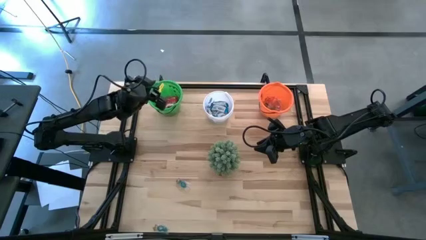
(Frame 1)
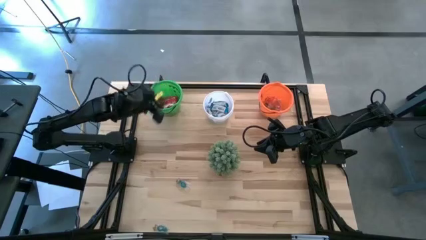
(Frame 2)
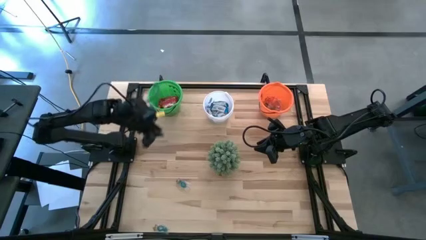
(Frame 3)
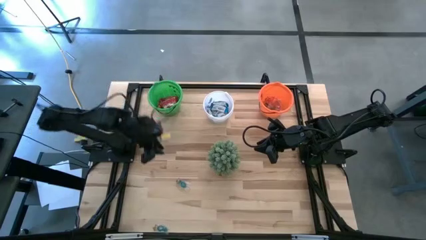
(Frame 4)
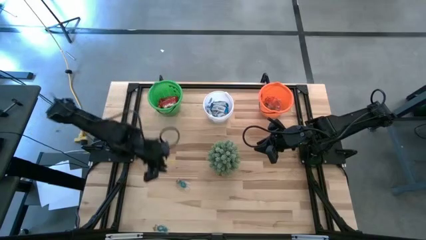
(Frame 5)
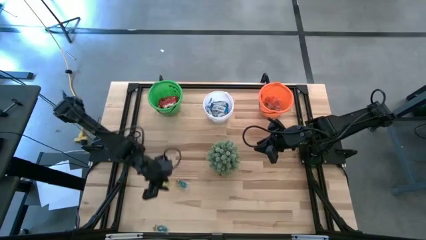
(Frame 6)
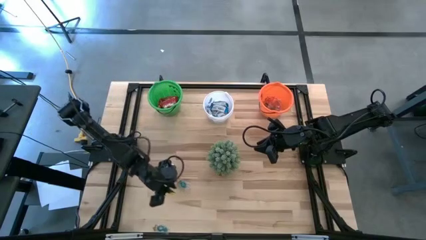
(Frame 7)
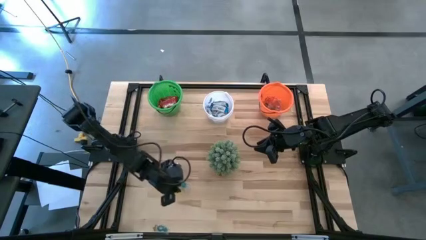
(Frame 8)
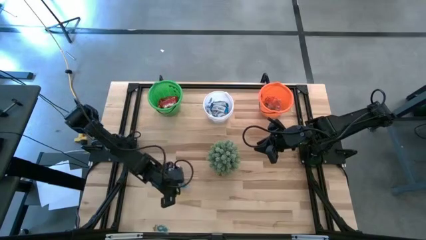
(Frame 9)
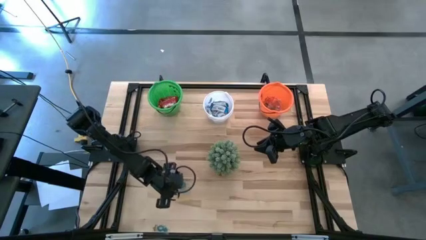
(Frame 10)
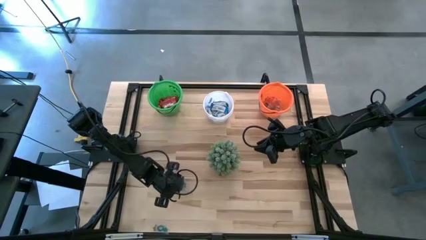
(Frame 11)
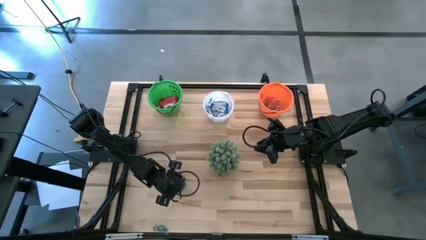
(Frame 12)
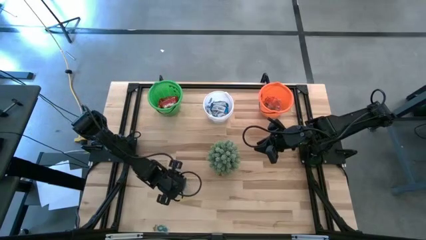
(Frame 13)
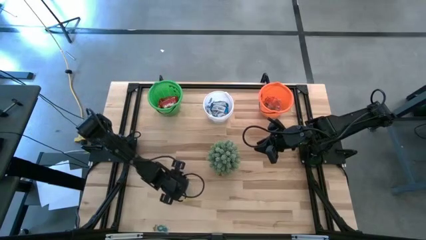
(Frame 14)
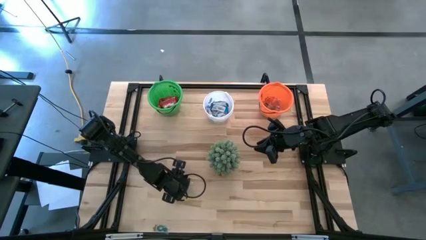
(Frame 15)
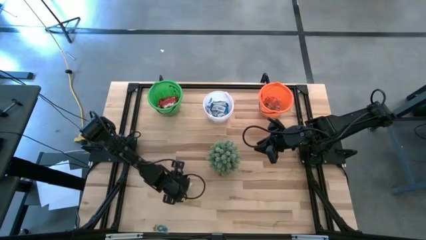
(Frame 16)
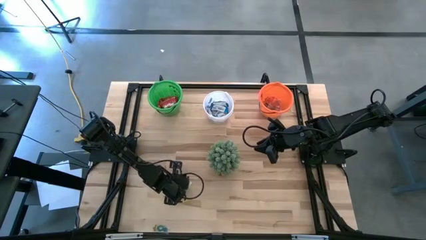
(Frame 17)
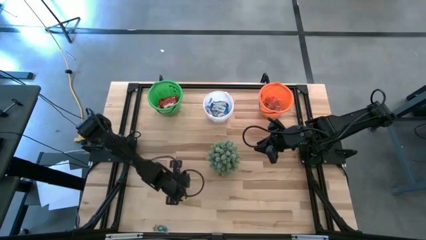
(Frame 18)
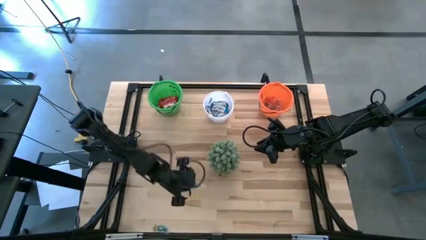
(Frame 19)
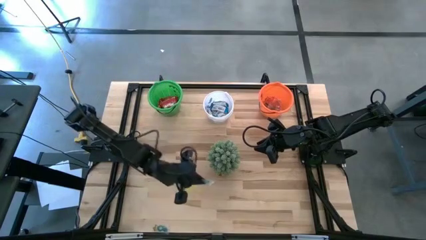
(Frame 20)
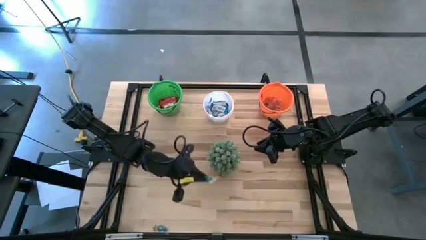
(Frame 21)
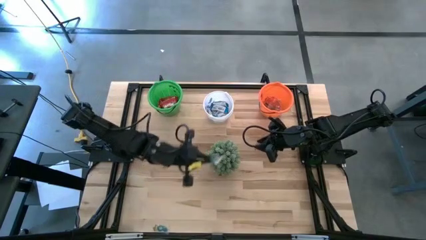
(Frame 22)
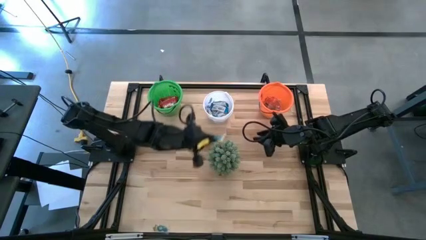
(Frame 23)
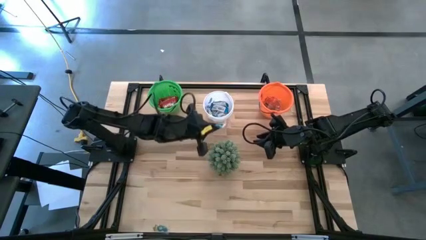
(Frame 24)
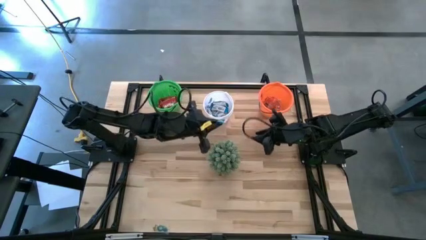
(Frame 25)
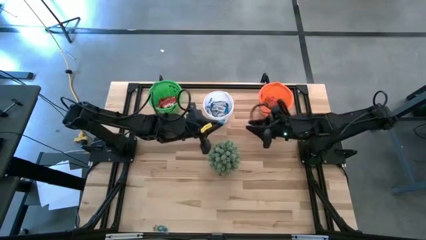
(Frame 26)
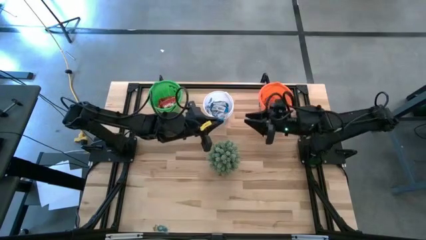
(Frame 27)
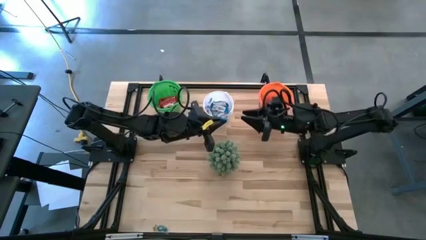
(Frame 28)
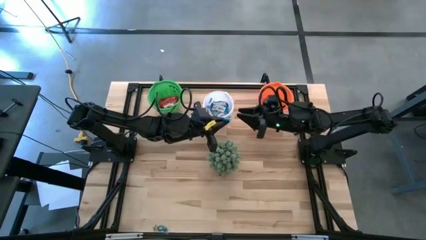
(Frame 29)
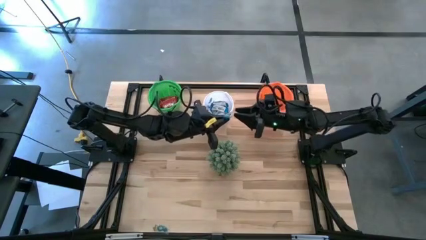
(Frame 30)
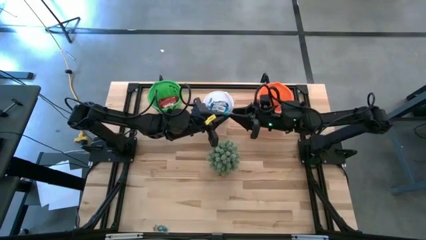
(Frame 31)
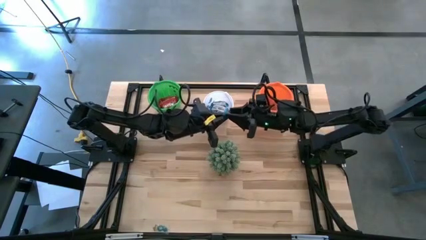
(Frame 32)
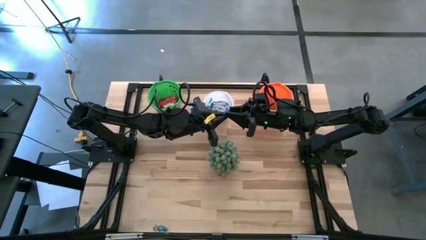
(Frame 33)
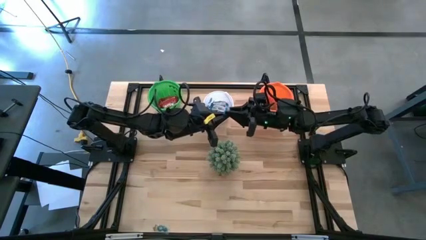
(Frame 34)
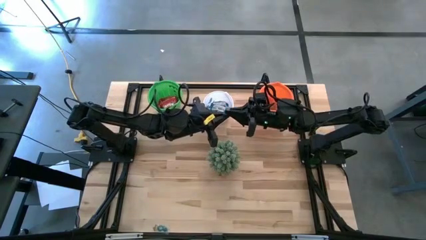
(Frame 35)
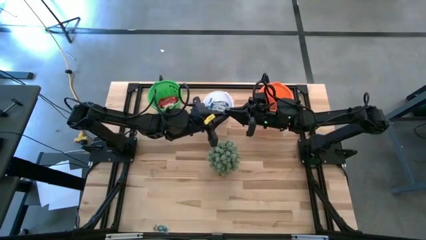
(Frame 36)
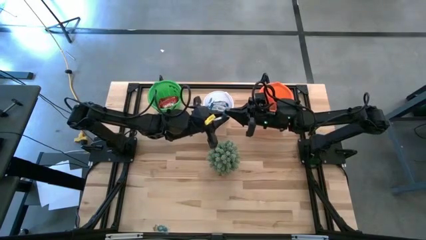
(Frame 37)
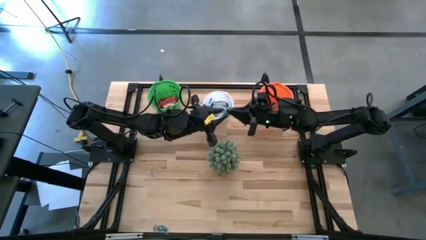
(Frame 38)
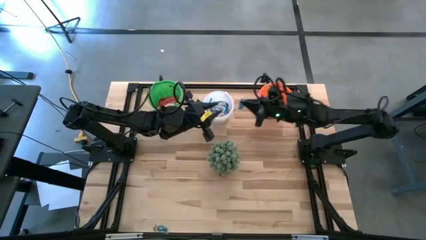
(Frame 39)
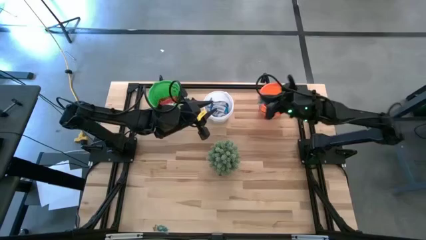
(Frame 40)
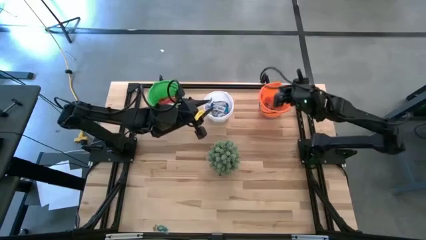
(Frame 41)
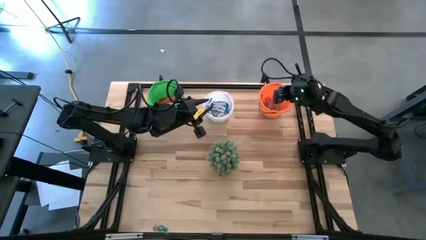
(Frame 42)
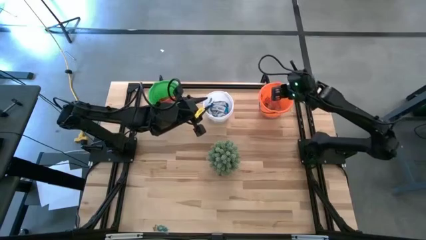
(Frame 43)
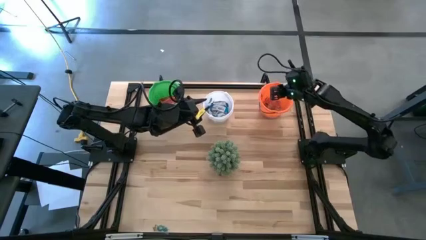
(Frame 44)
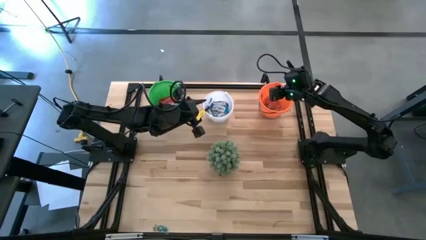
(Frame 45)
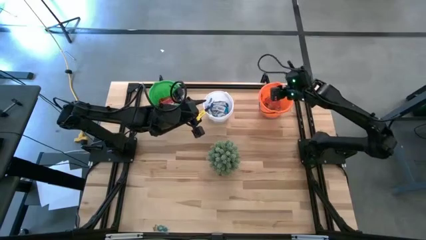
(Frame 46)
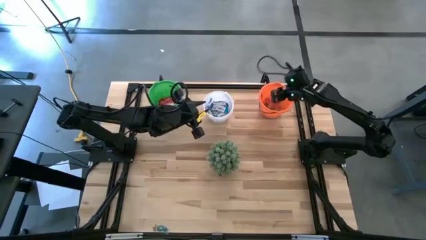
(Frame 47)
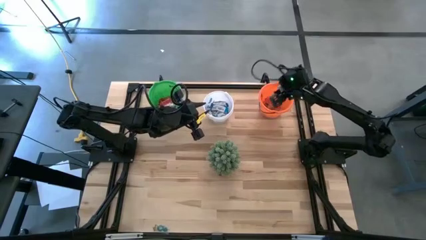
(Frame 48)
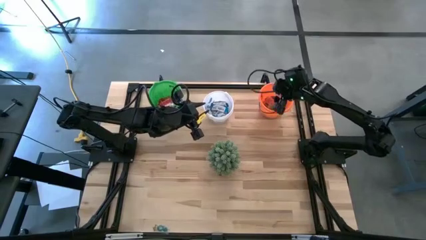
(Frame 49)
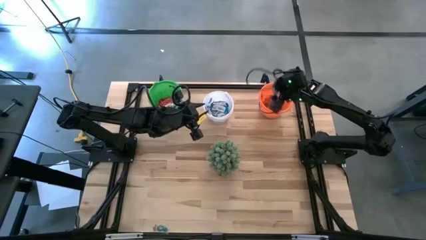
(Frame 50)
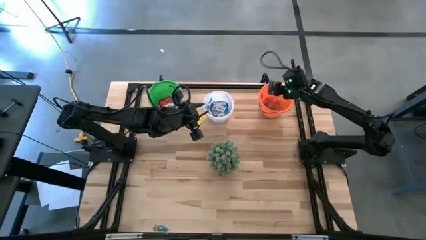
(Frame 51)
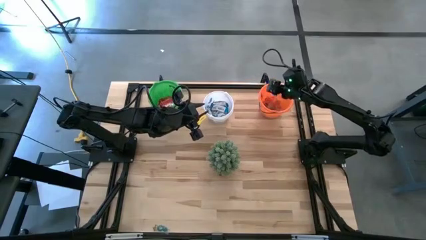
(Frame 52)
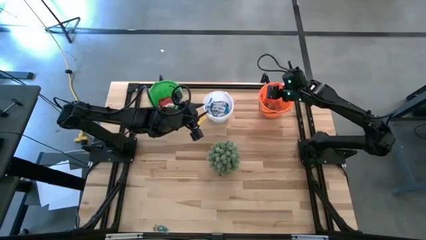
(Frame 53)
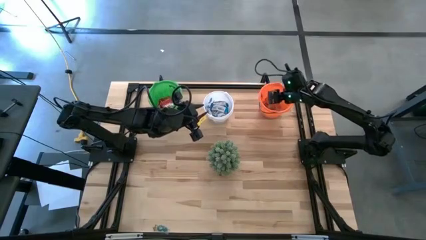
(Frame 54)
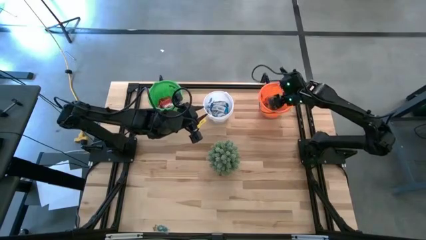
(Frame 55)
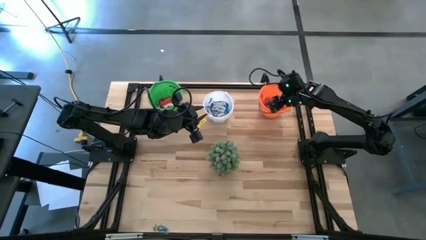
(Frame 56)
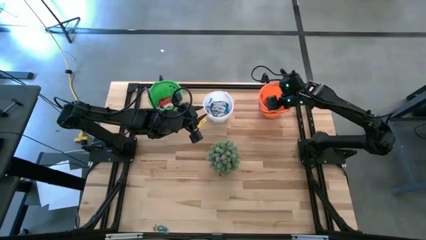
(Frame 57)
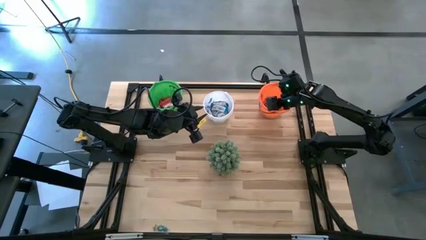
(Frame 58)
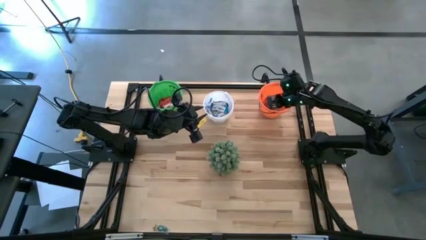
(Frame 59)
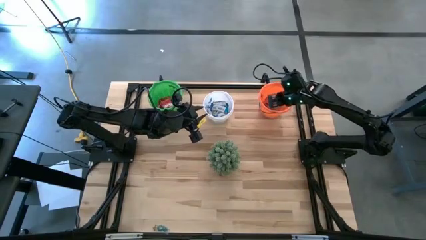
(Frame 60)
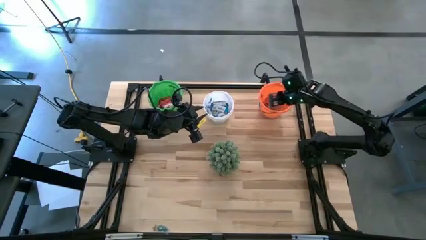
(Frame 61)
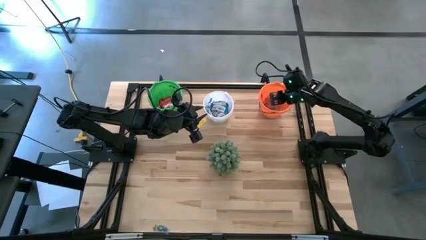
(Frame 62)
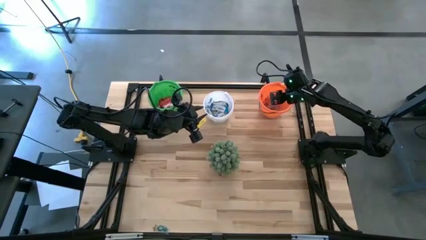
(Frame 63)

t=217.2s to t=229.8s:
Task: Sort candy
Put the transparent candy into the orange bucket

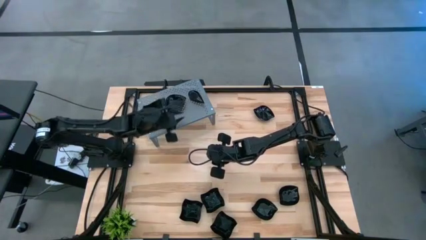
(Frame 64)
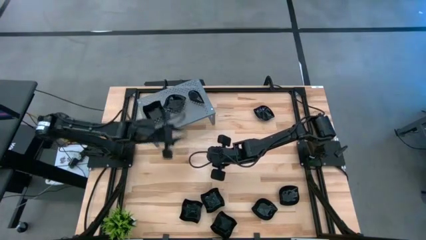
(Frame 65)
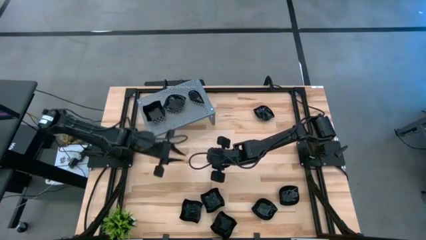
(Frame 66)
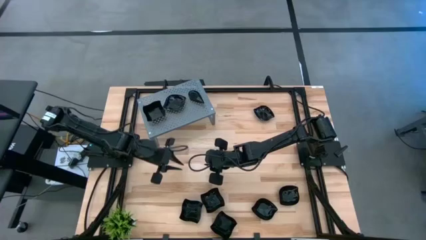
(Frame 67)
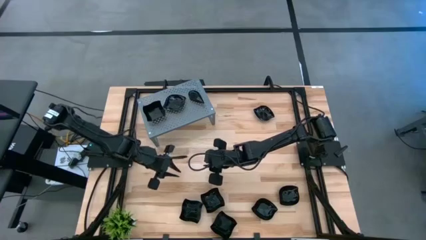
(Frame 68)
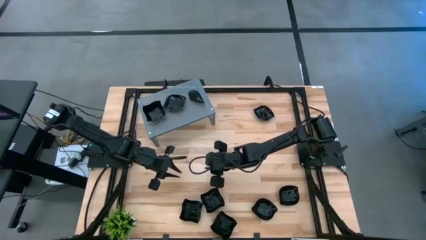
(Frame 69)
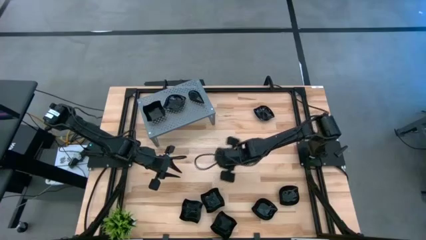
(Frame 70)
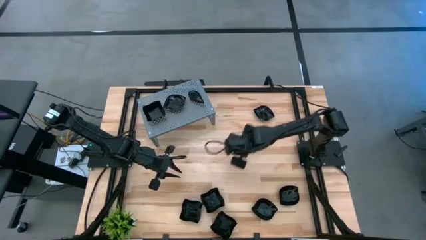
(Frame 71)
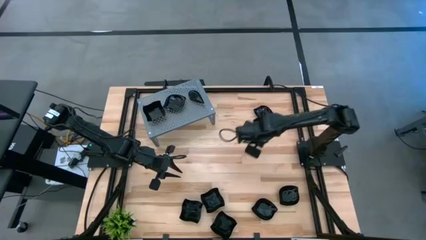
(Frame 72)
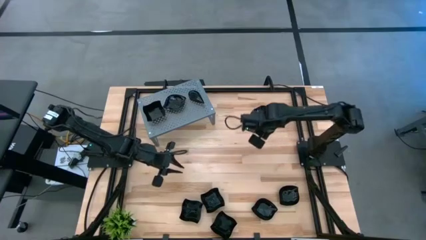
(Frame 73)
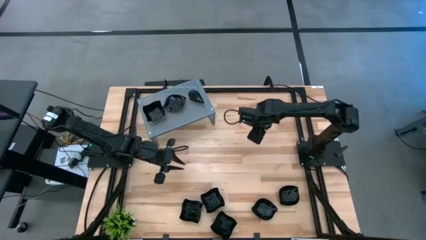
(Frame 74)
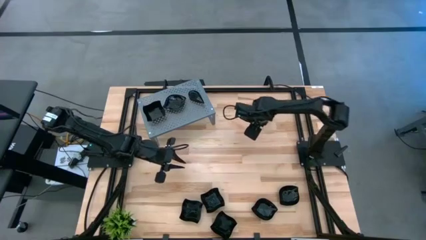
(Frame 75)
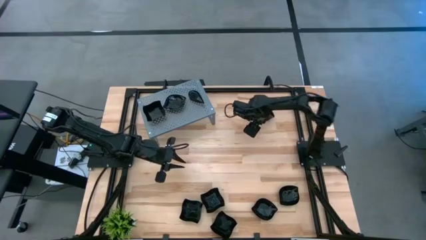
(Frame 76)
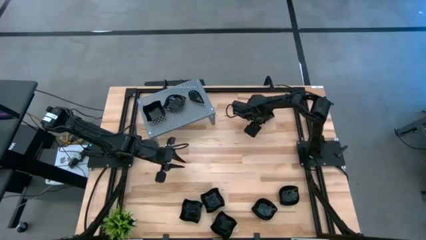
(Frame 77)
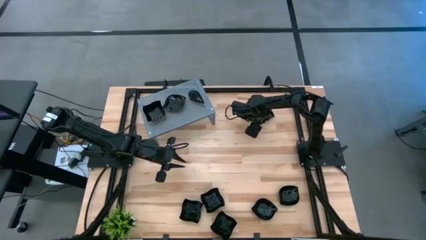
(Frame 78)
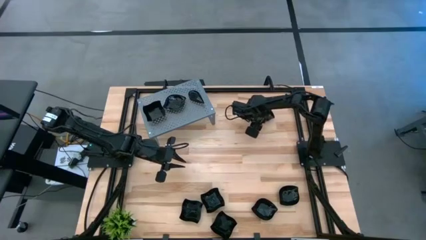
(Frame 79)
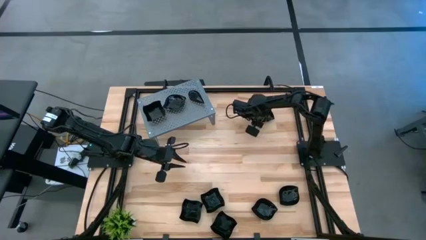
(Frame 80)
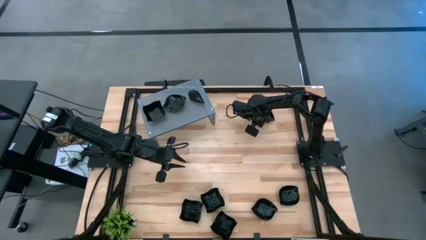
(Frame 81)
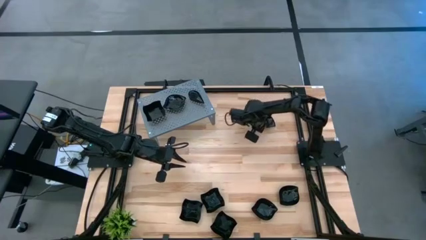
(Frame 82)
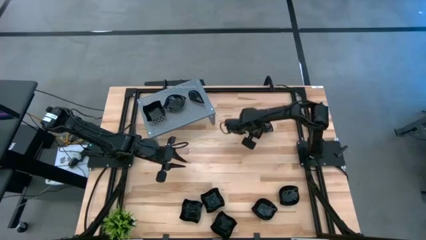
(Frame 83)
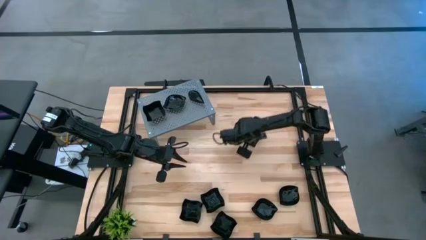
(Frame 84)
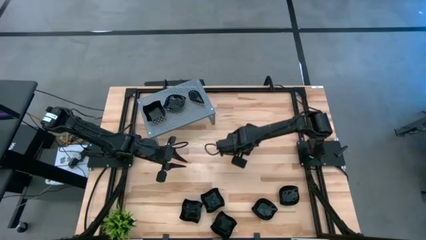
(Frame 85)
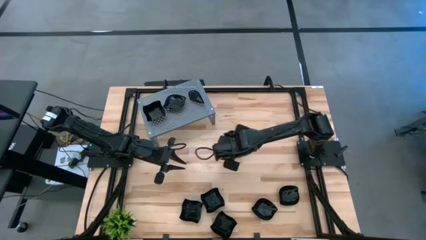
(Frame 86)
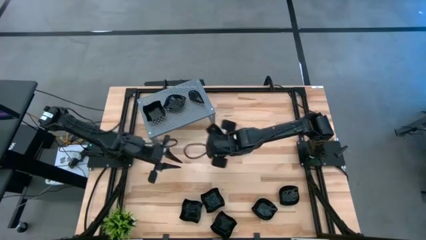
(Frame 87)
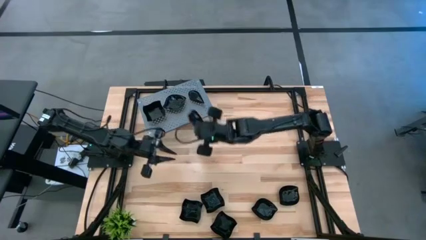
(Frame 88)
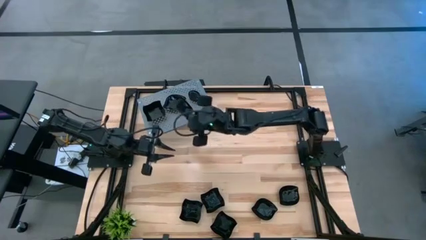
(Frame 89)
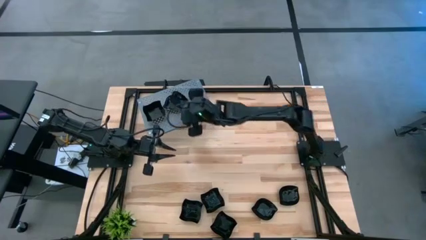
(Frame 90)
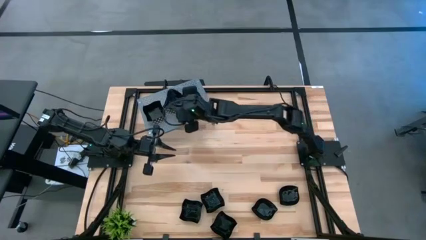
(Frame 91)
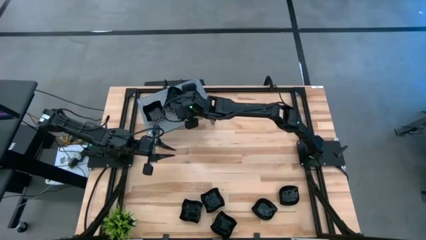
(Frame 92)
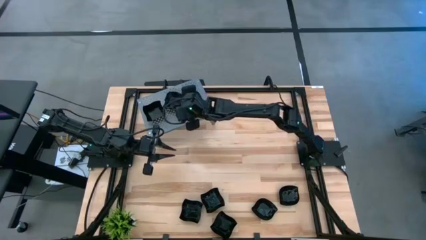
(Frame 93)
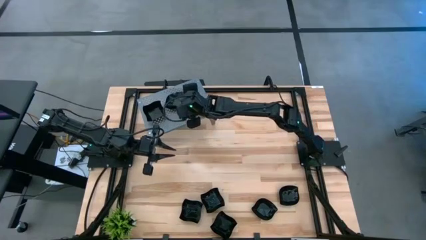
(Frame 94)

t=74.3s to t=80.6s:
Task: Pick & Place Mini shaped plates
Stack the black leaf shaped plate on top of the black leaf shaped plate on the shelf
